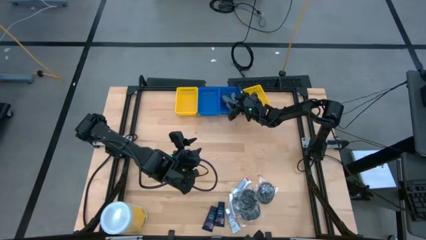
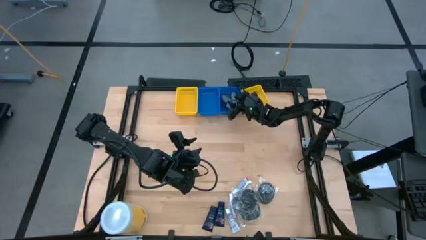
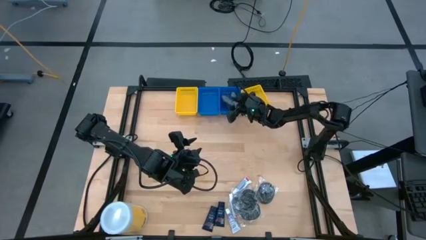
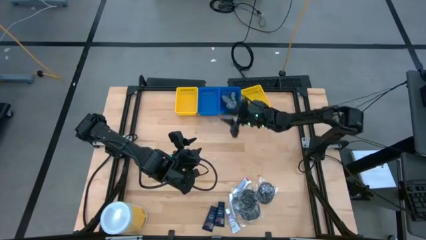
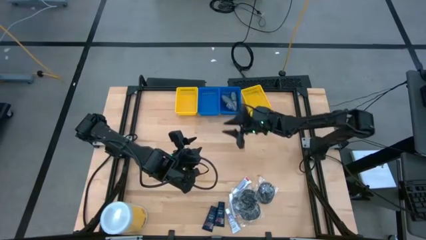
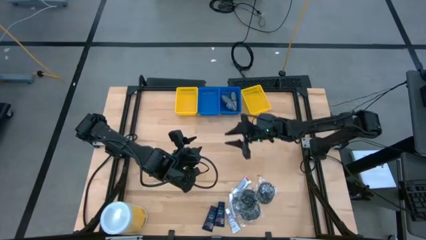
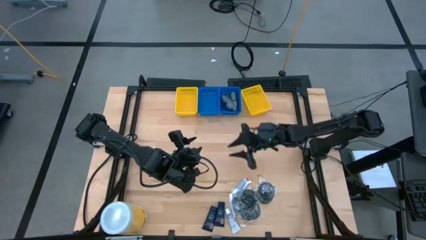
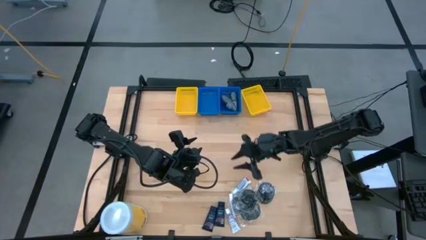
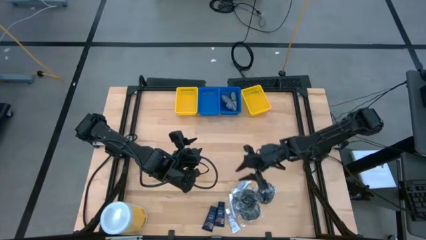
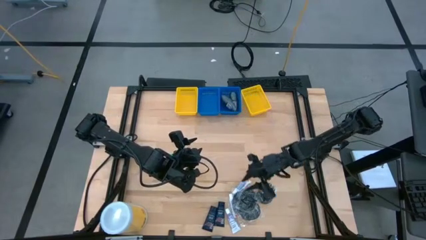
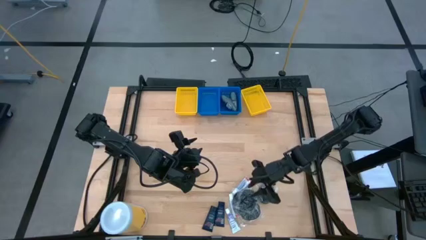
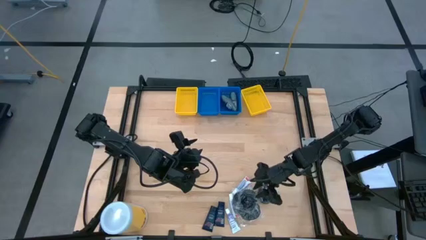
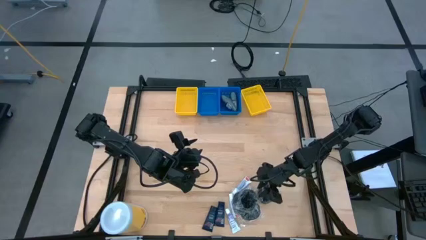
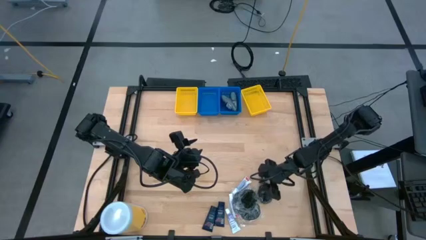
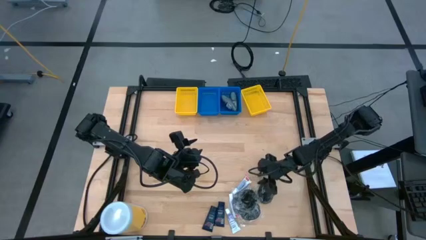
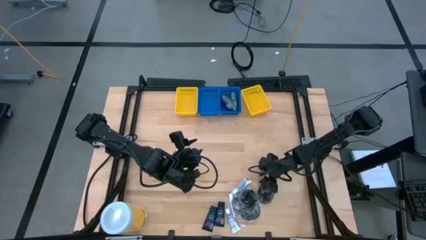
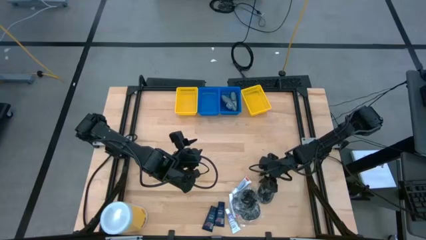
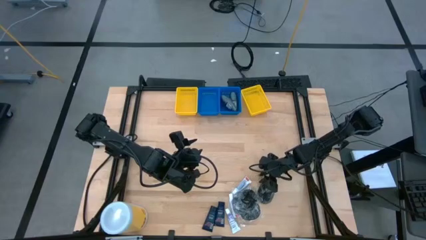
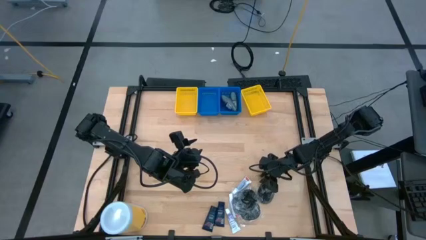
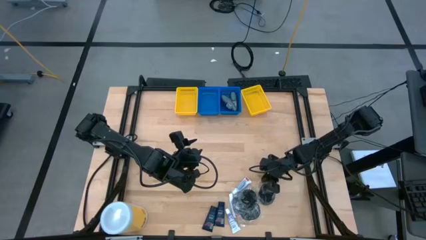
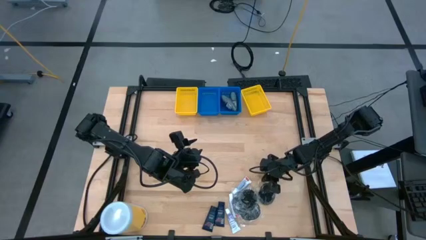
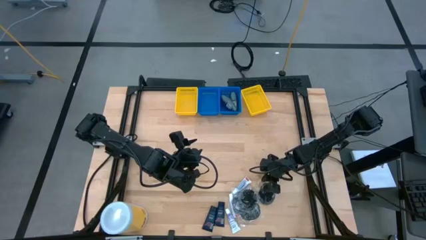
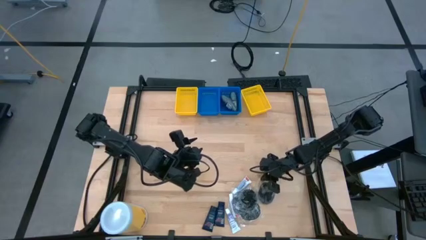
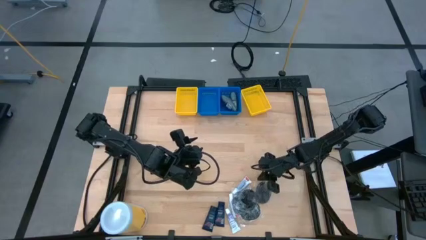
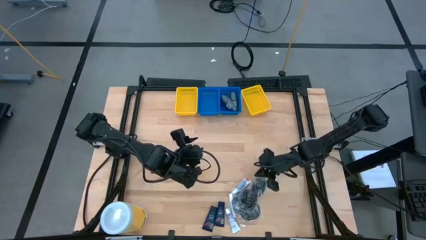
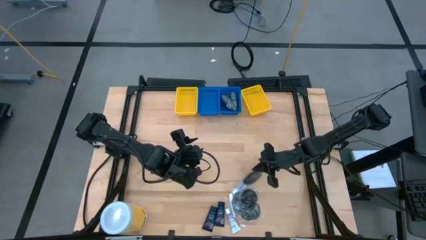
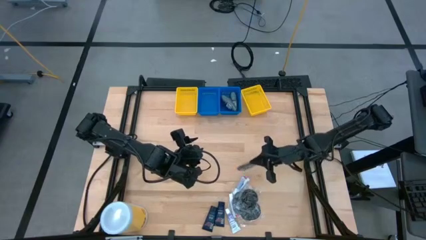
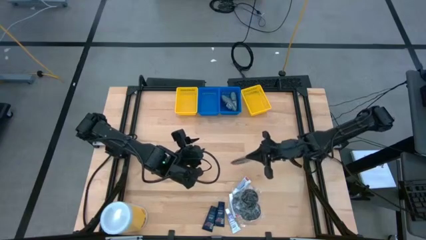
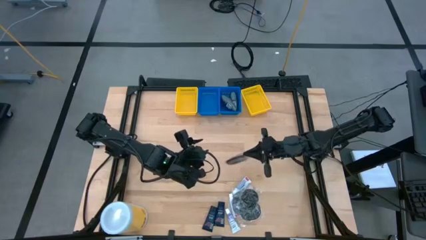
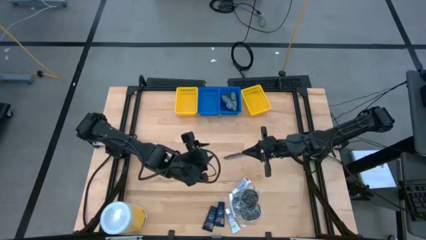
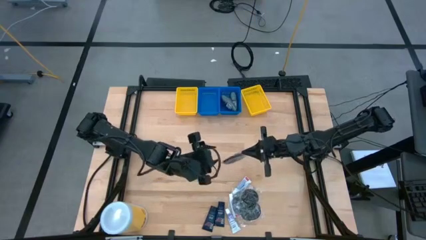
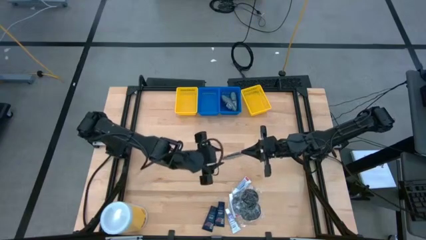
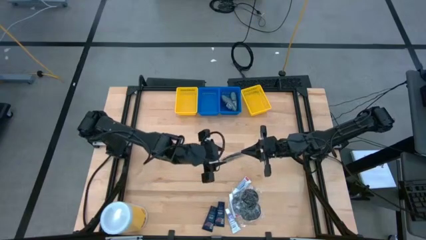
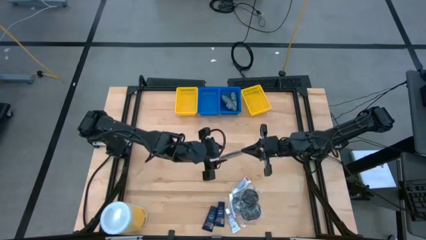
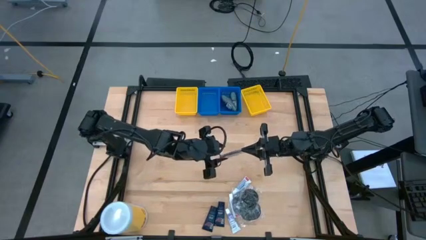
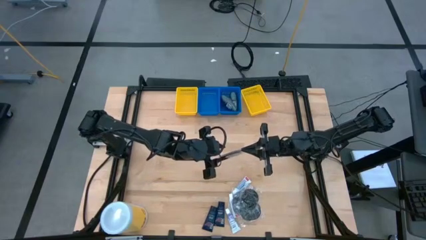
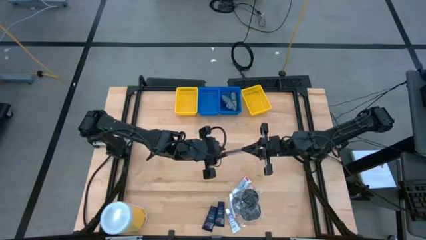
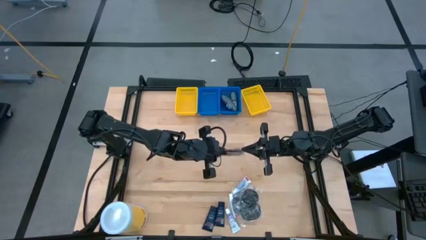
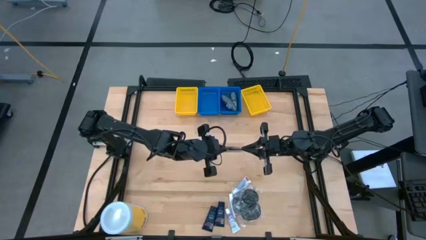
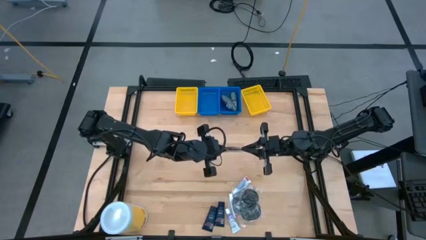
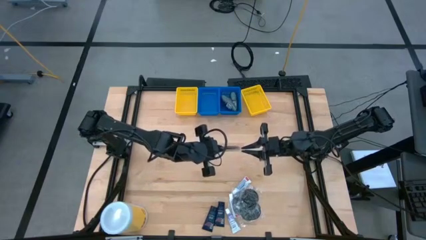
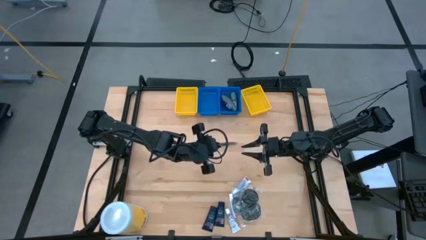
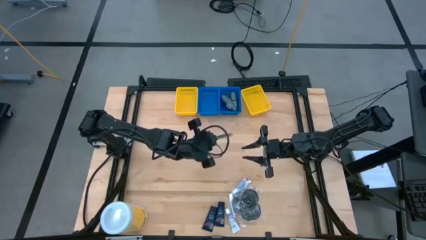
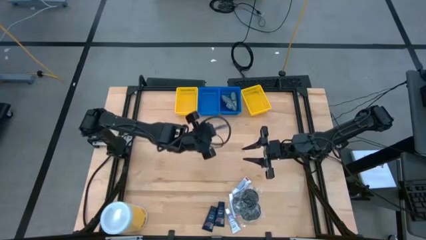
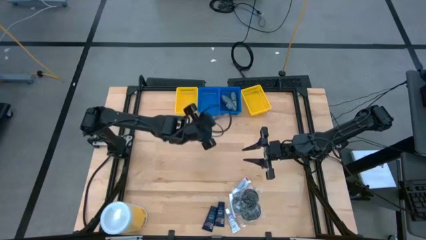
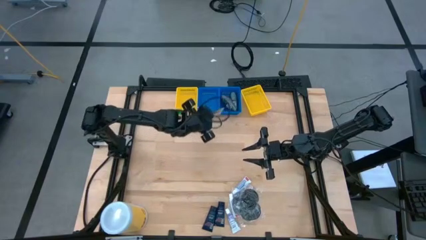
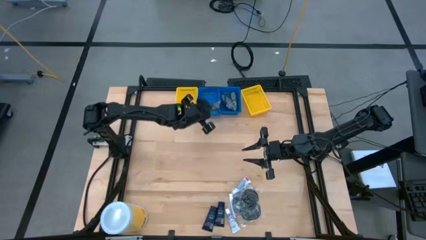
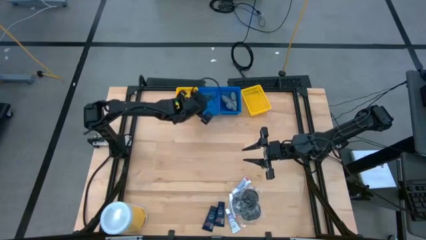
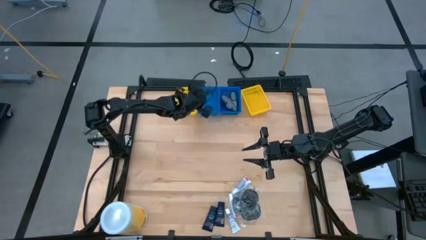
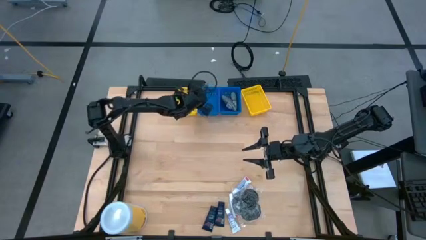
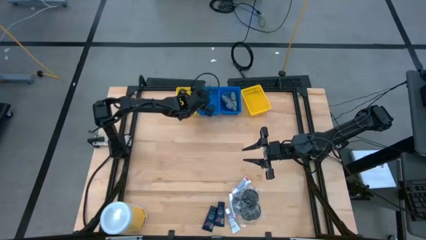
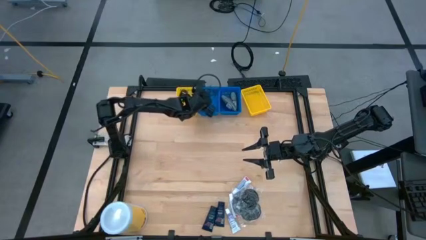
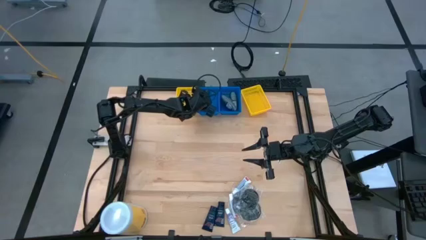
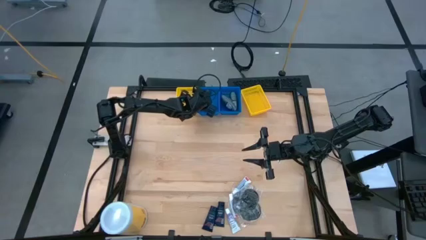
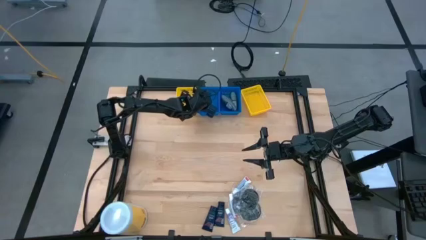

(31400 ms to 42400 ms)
Task: Pick & Place Travel size toiletries
Put the hairbrush into the left blue bin

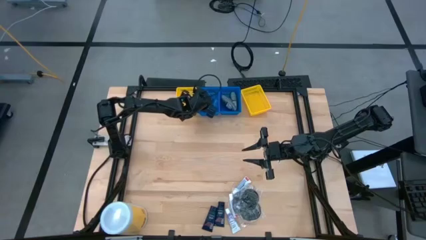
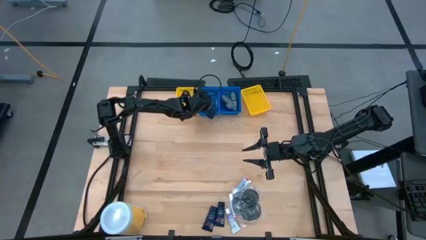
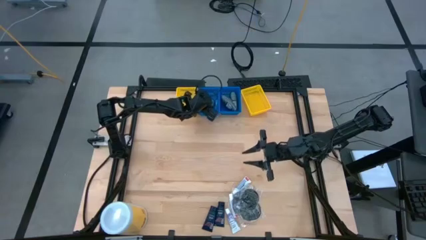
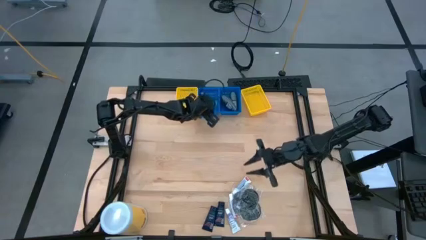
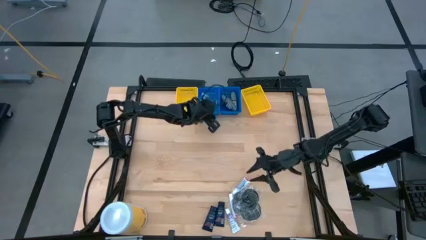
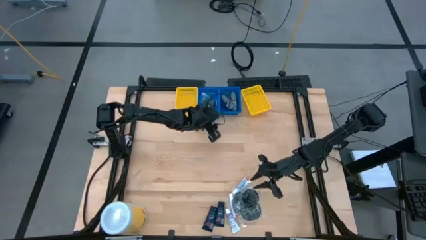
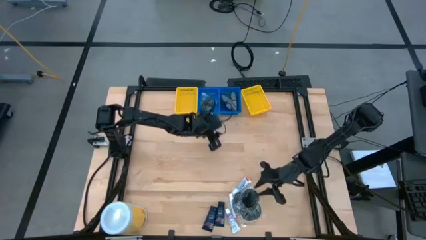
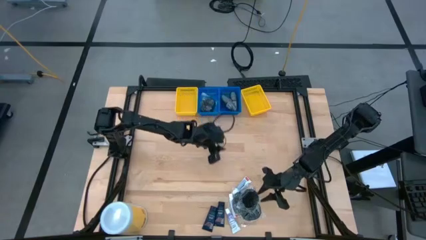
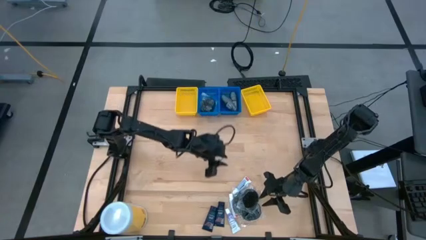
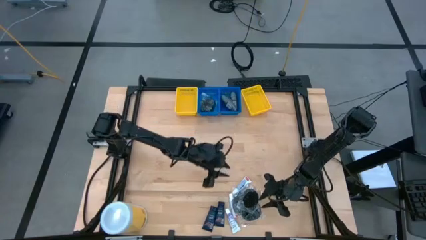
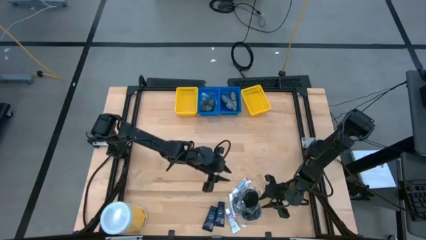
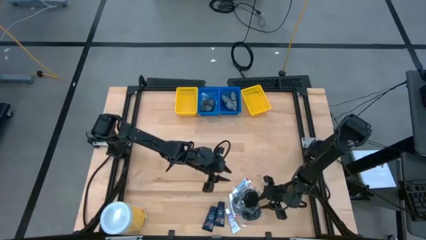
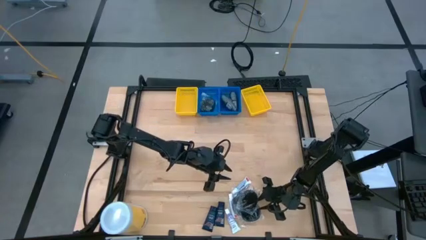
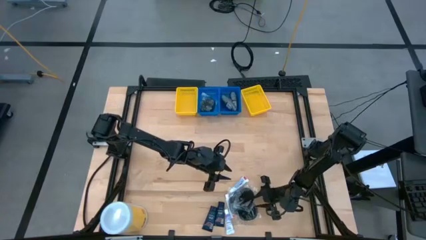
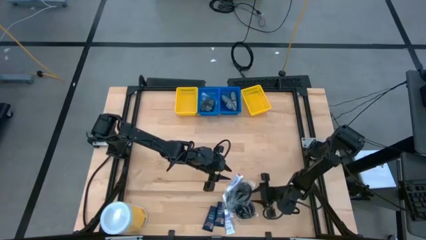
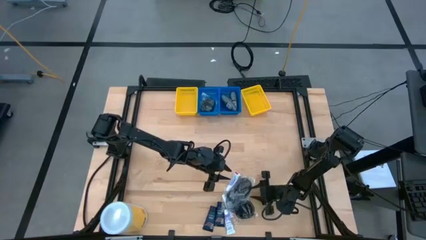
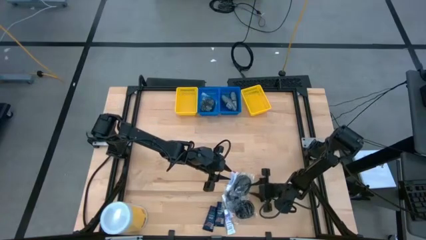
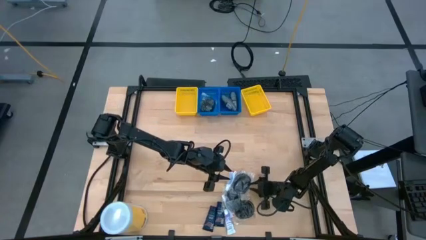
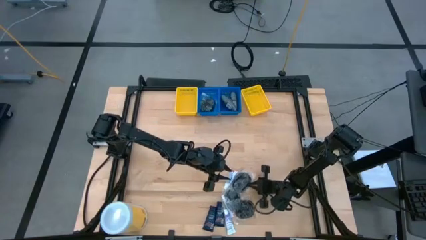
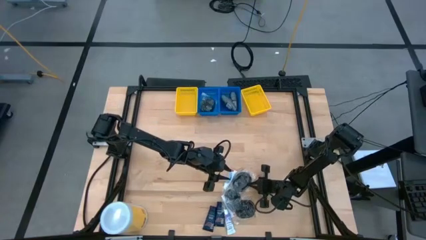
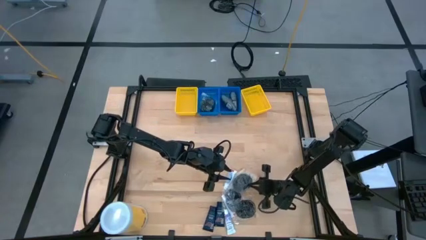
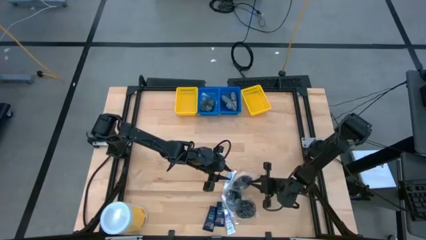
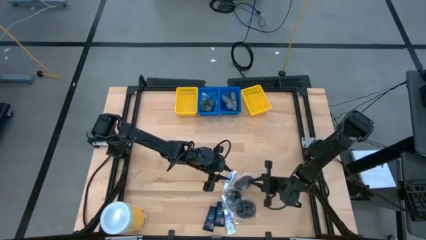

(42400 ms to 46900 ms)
Put the hairbrush into the left blue bin
